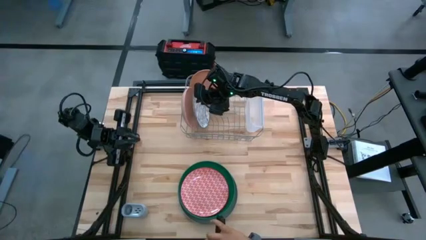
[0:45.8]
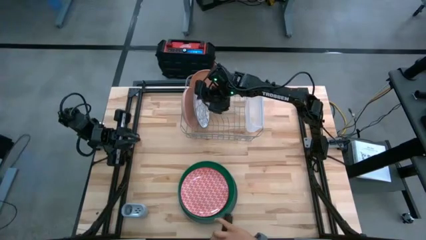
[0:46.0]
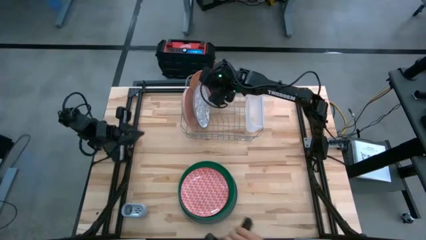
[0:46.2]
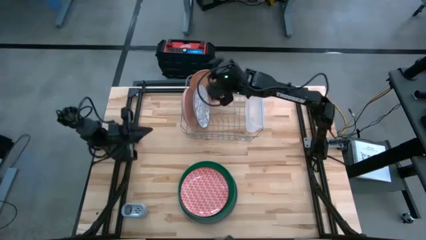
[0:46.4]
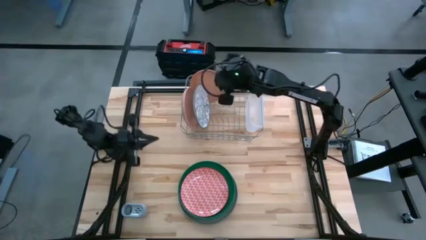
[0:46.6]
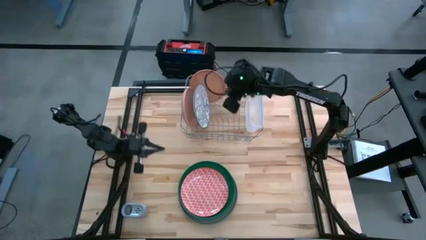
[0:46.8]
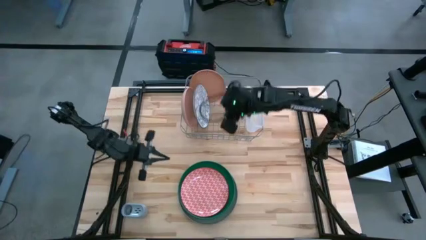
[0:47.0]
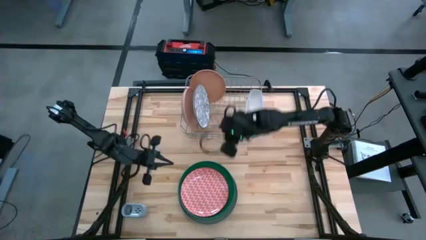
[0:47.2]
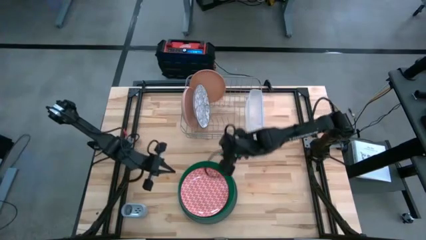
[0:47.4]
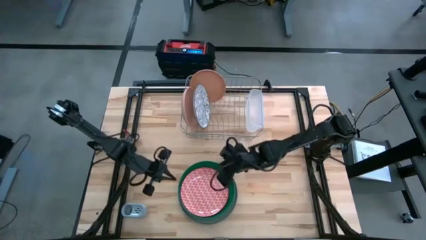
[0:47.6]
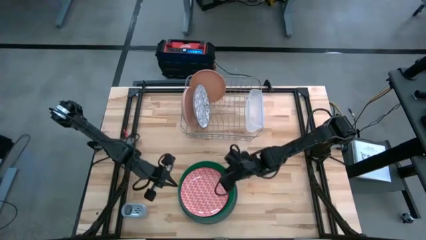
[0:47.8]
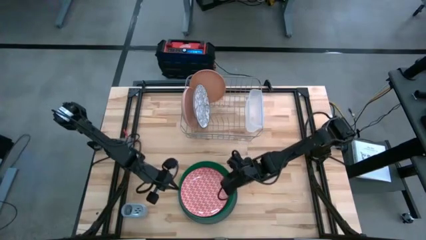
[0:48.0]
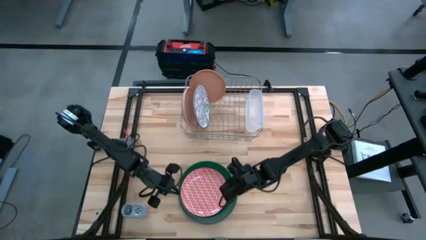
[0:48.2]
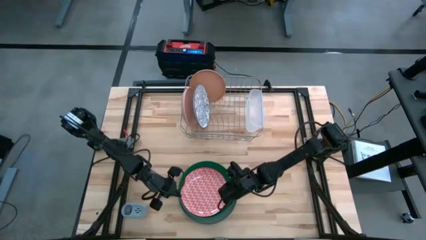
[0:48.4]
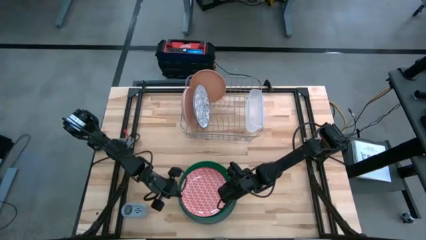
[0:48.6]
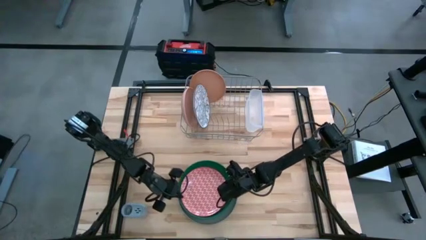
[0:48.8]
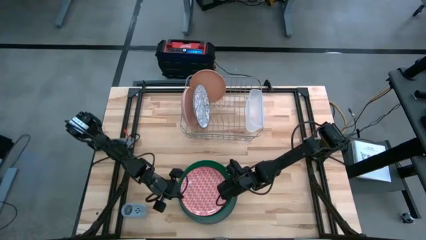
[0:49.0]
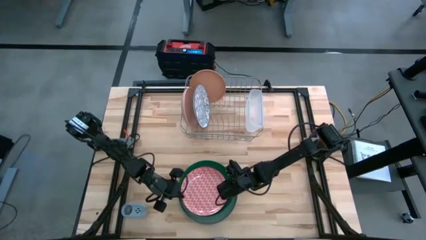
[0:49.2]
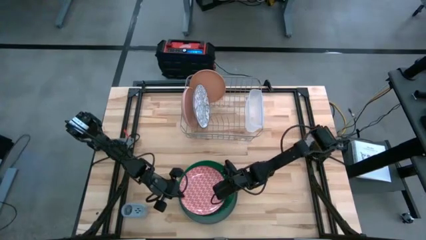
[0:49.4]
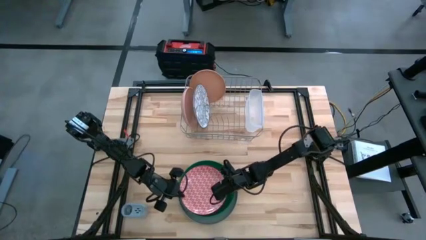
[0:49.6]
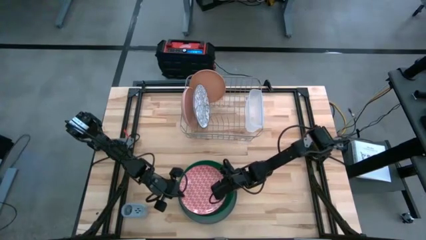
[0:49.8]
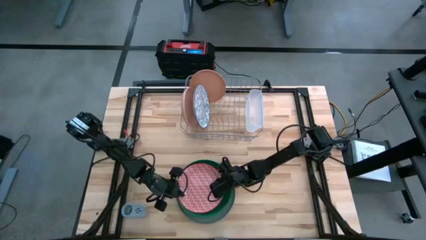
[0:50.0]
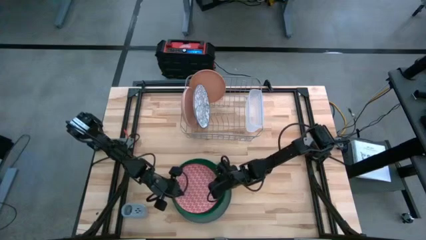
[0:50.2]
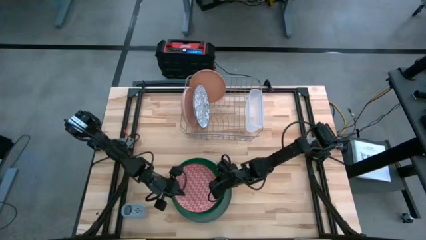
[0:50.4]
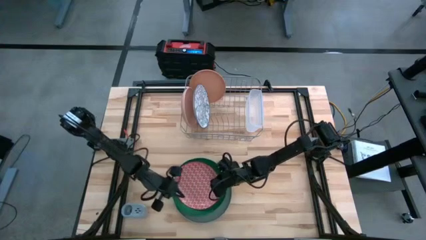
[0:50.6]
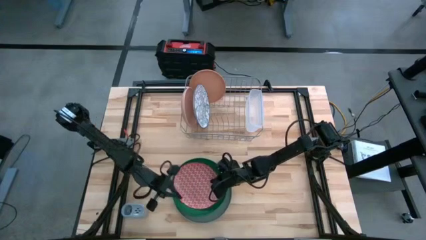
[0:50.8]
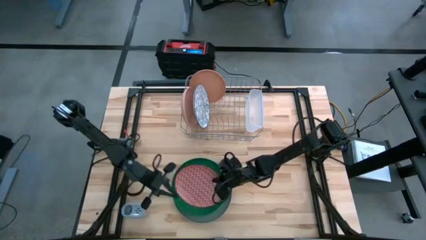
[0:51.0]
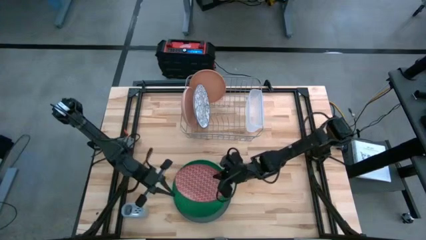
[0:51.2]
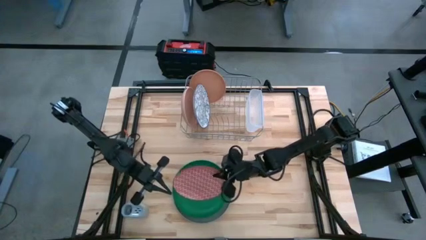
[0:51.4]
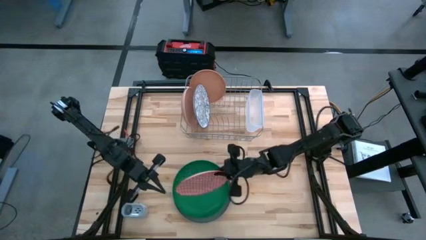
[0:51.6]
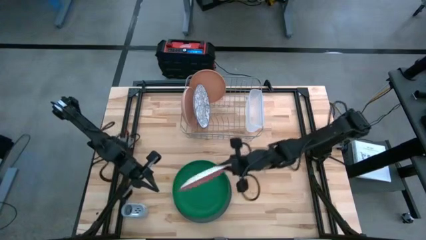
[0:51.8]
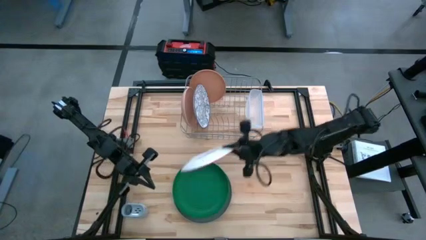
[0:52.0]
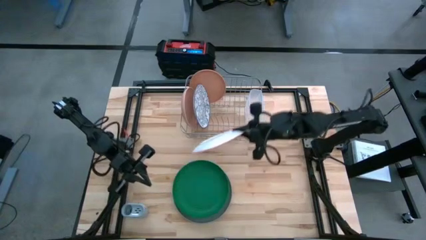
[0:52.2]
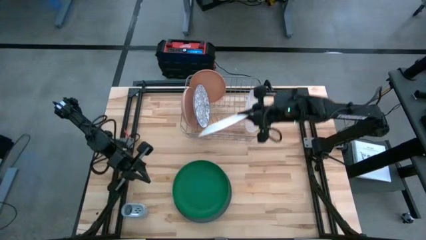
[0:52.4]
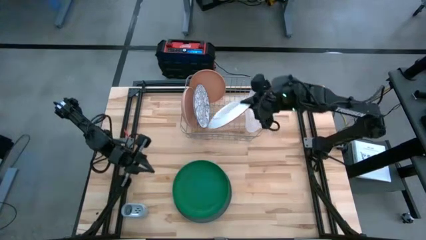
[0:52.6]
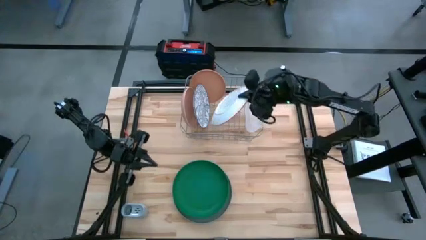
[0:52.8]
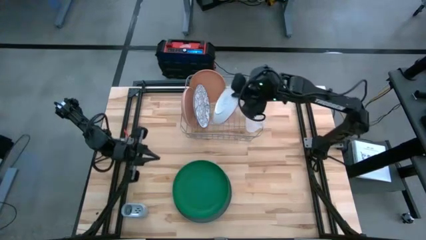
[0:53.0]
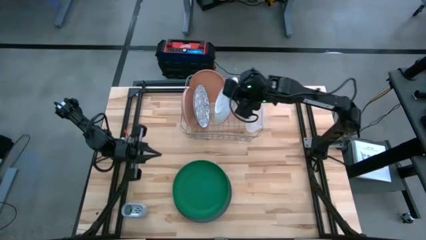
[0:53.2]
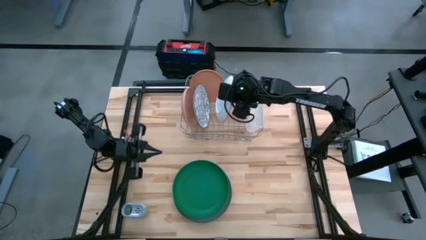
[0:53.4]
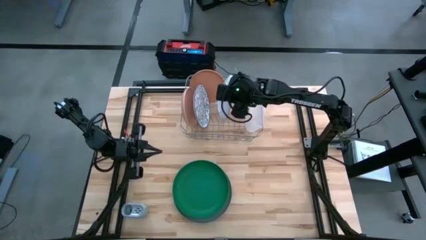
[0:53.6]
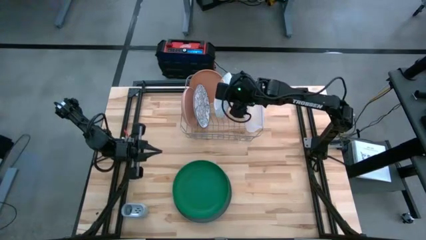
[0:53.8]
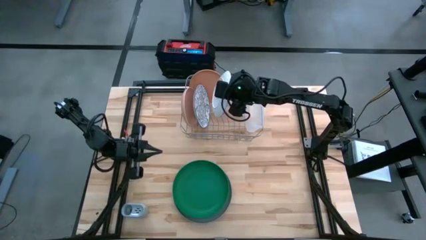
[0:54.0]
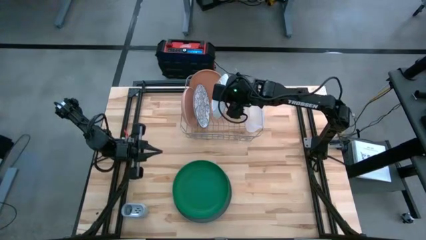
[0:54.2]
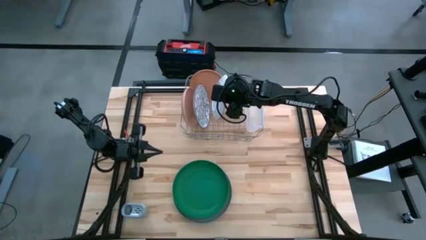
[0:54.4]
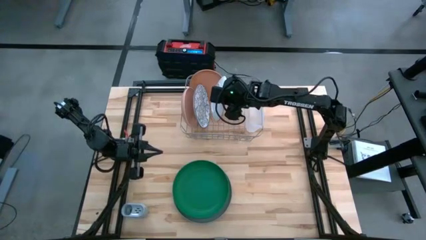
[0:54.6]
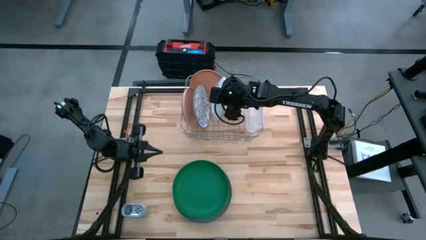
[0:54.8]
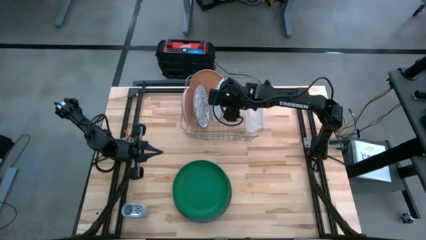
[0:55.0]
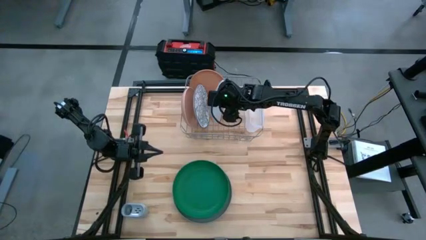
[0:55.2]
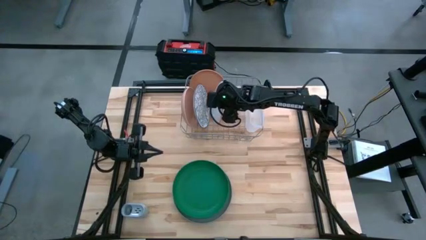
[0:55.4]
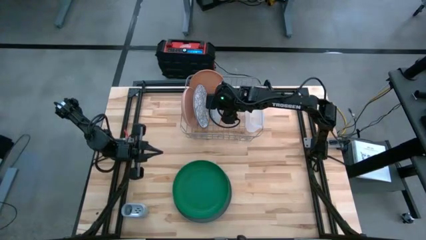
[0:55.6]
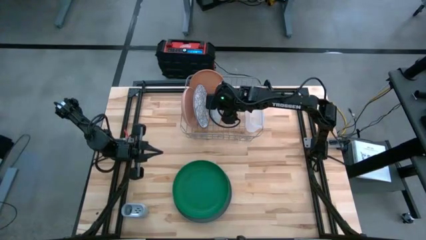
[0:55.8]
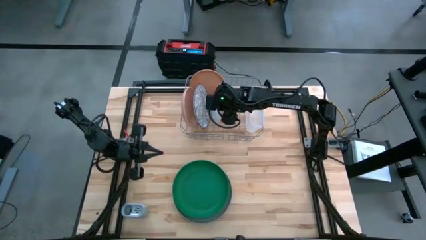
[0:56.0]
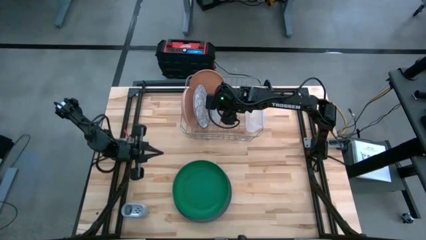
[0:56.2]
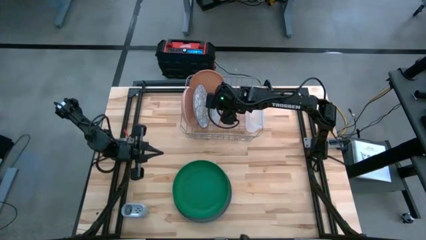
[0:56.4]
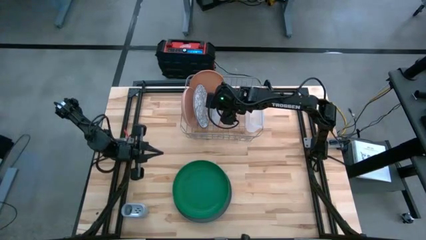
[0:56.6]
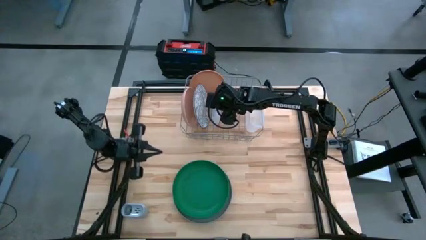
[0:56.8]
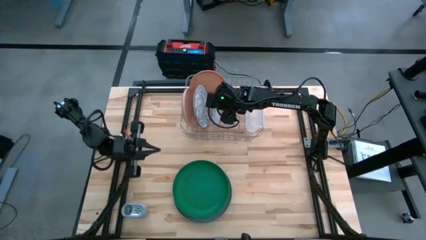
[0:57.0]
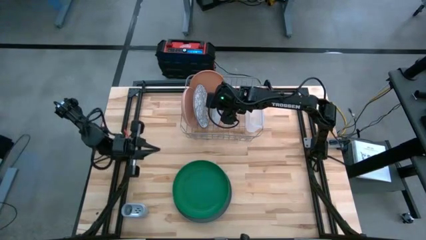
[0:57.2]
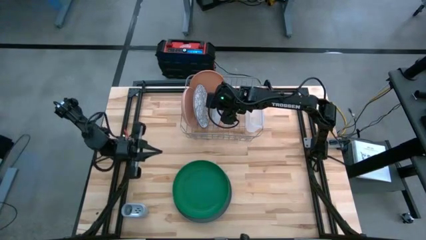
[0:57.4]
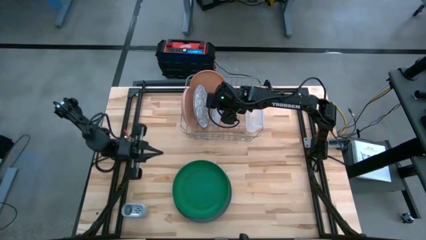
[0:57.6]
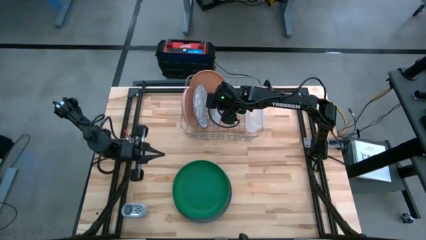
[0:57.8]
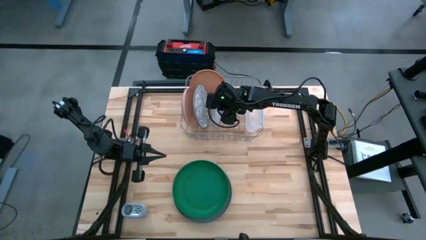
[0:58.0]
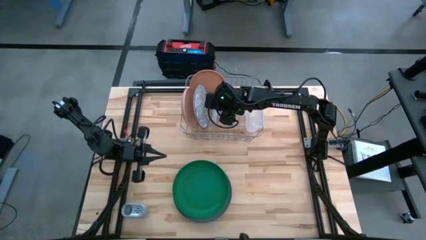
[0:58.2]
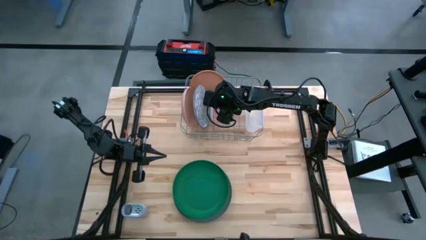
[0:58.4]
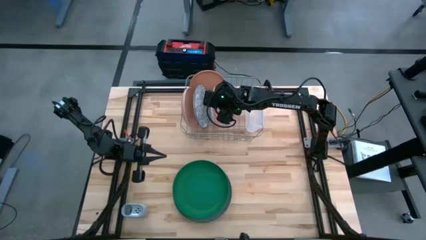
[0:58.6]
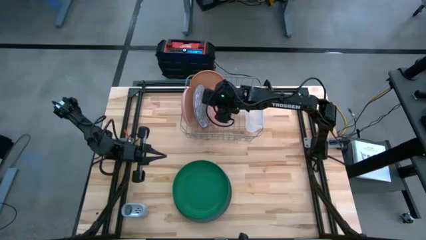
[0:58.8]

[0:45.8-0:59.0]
Task: Sort dishes
Put the orange patterned plate in the dish rack

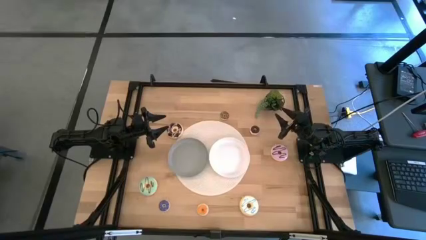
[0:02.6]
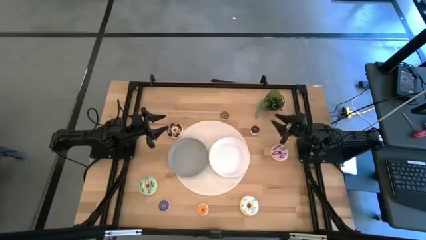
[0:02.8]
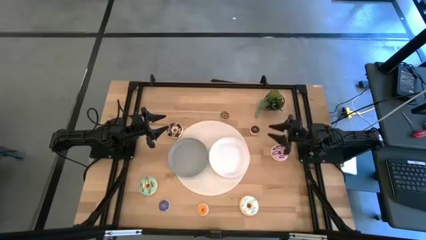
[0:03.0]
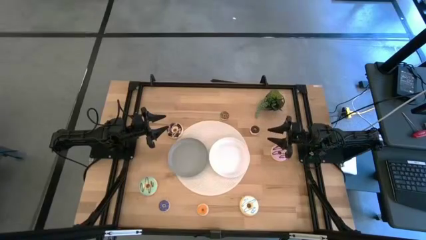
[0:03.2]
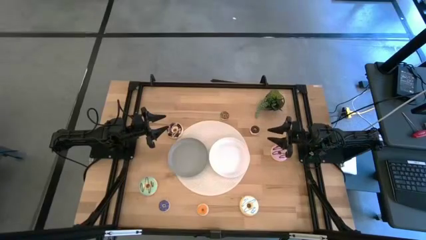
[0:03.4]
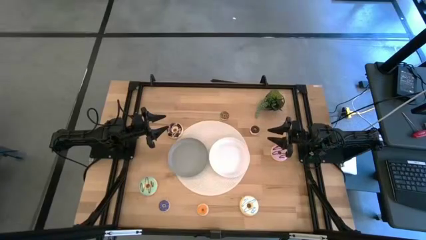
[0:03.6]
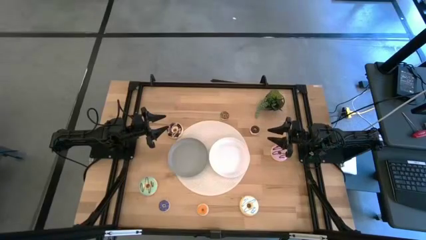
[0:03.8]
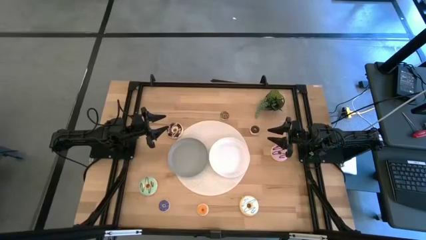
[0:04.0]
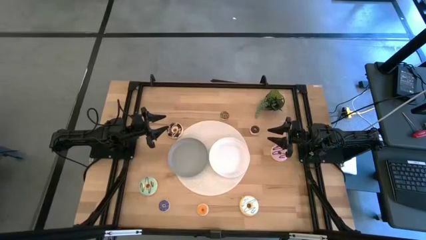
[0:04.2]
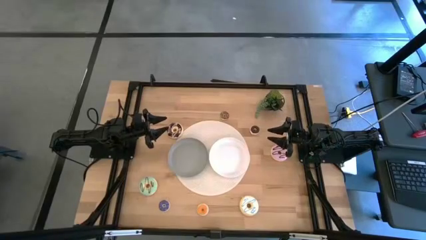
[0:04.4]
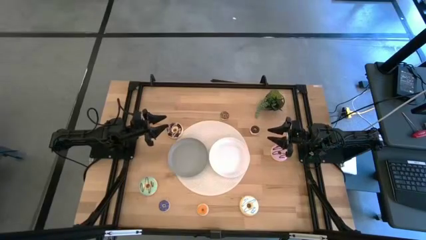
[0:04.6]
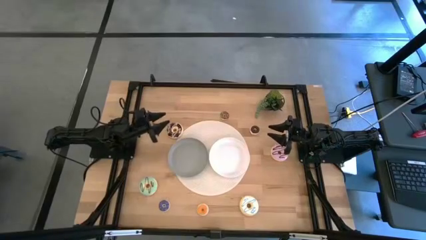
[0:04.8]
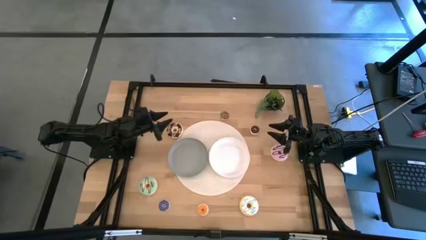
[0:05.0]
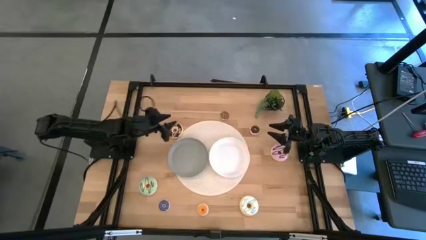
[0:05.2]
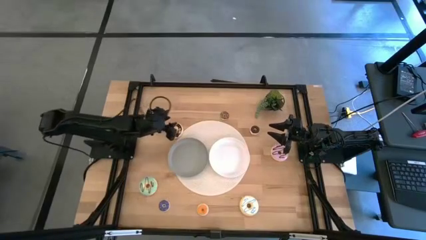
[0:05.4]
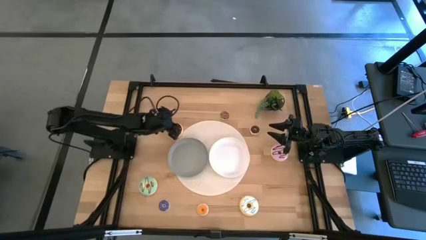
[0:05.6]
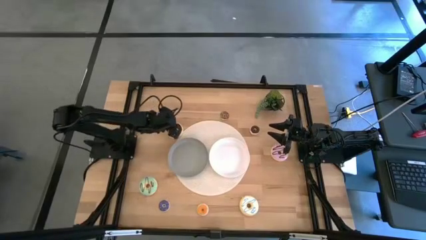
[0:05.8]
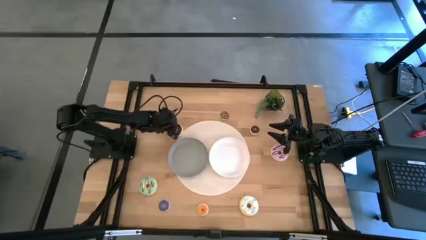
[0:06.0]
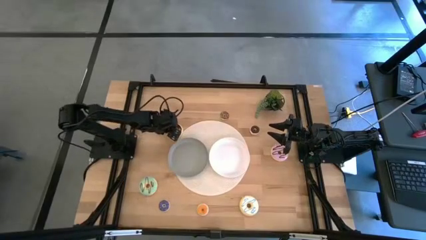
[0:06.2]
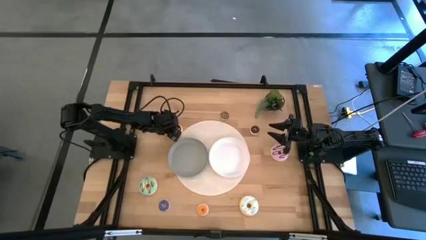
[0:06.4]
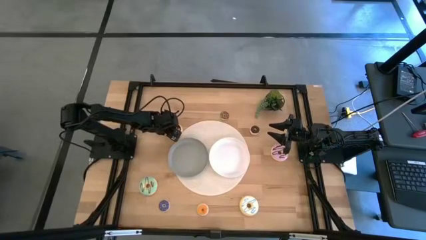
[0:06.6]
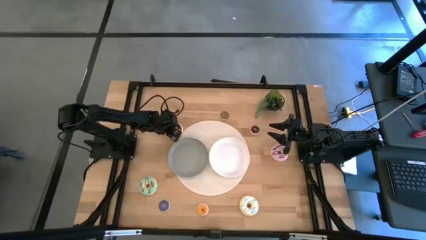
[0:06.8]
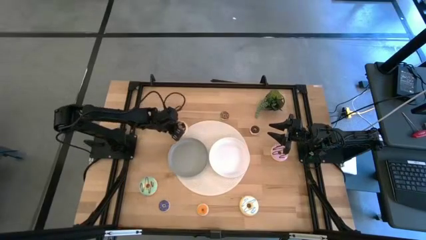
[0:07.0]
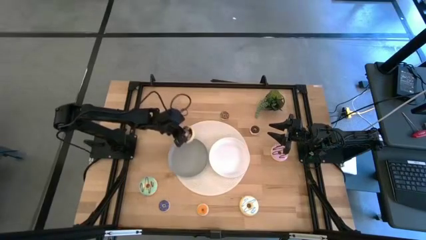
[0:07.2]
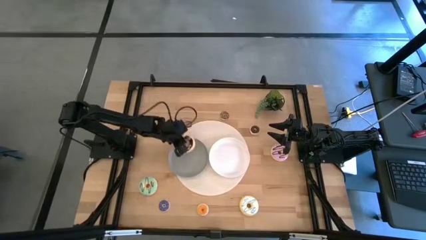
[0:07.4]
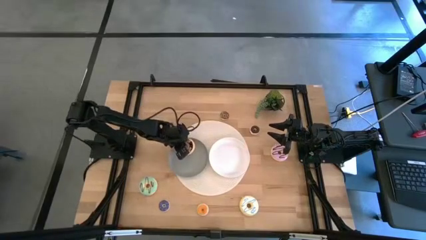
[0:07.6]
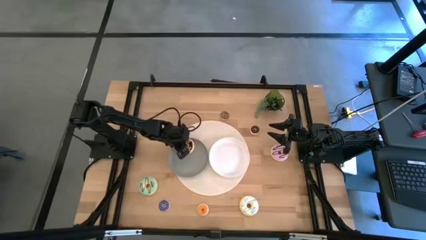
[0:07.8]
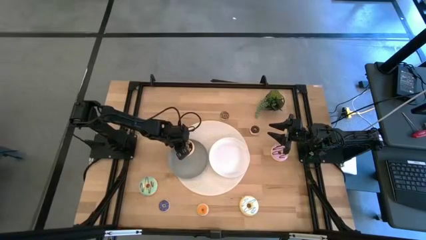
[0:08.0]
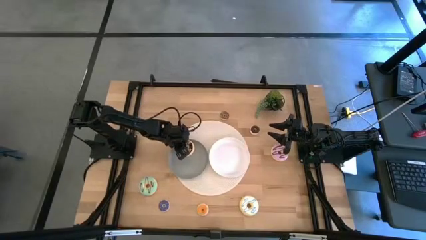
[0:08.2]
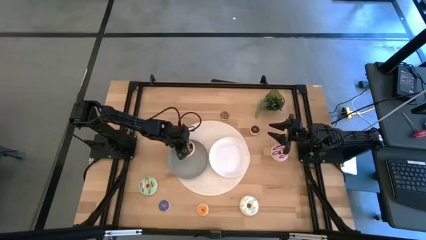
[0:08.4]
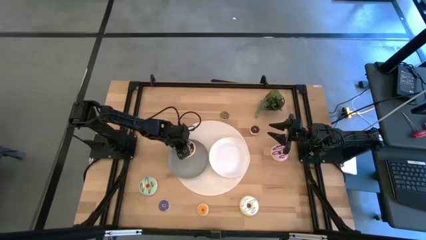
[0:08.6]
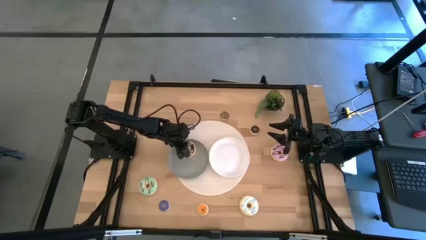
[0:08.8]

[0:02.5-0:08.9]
Task: Pick & Place donuts
Put the large black donut on the gray plate
